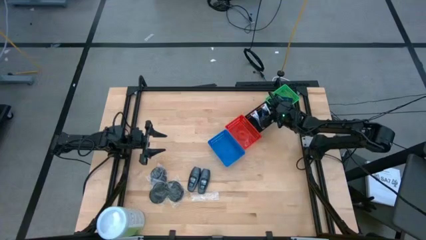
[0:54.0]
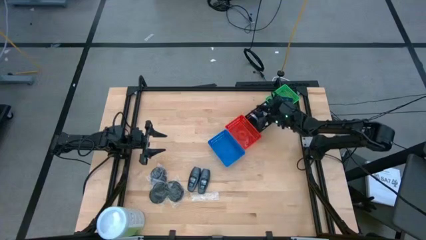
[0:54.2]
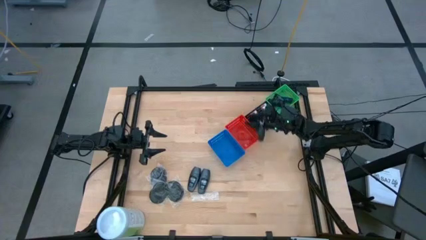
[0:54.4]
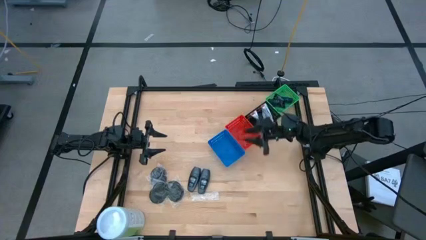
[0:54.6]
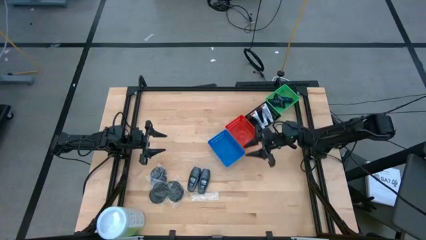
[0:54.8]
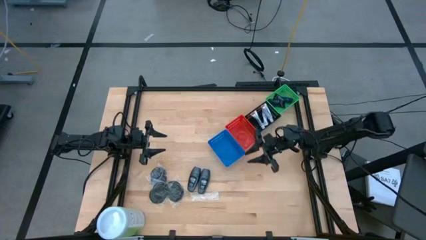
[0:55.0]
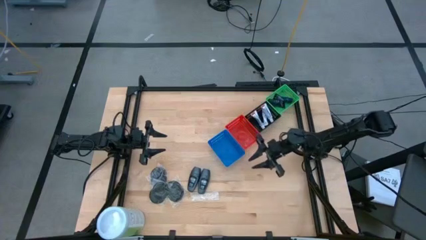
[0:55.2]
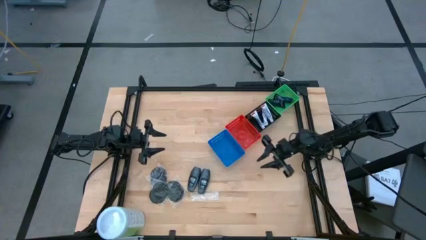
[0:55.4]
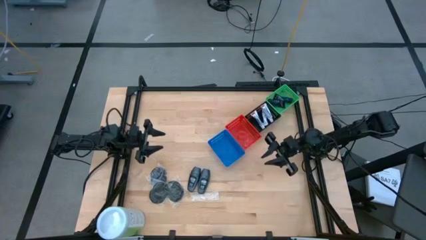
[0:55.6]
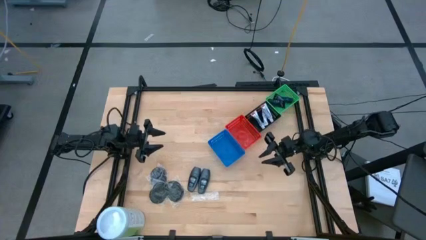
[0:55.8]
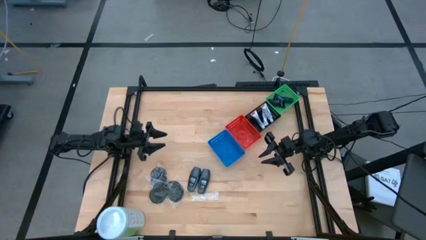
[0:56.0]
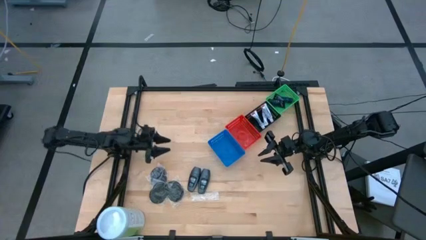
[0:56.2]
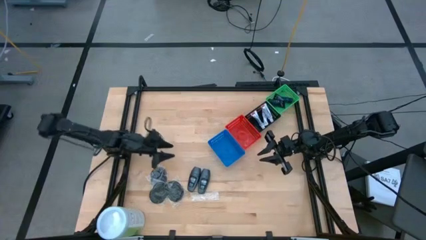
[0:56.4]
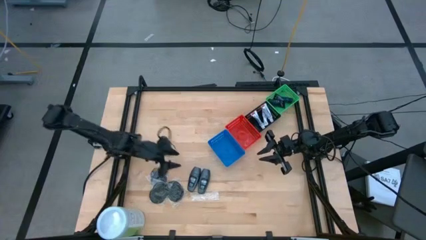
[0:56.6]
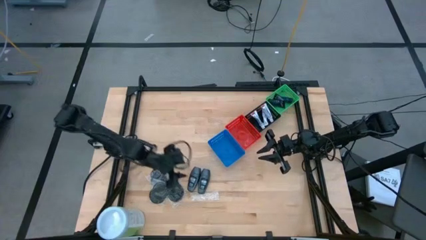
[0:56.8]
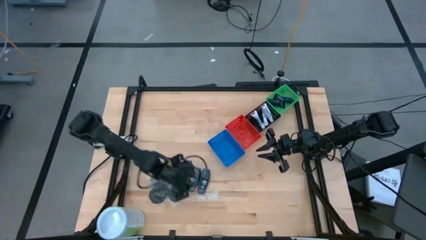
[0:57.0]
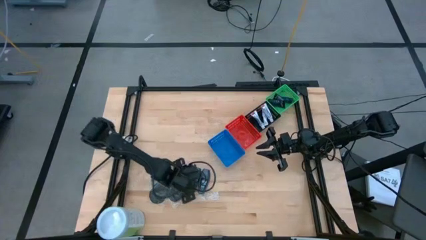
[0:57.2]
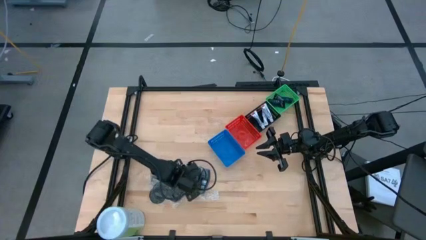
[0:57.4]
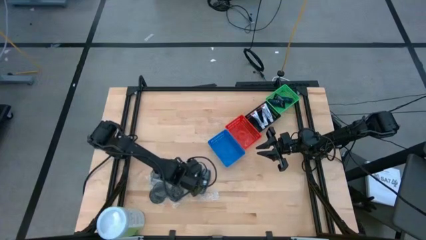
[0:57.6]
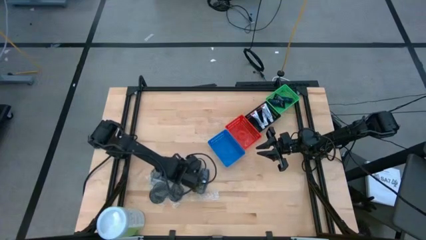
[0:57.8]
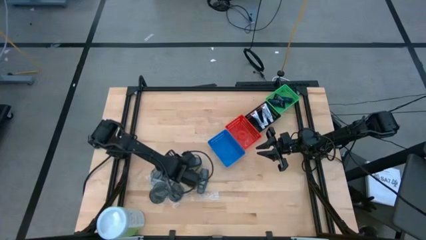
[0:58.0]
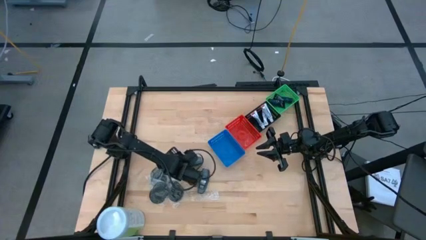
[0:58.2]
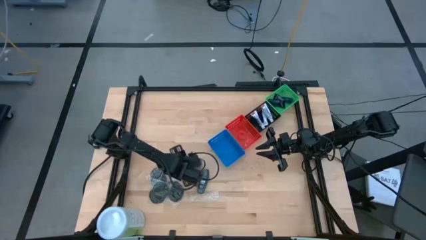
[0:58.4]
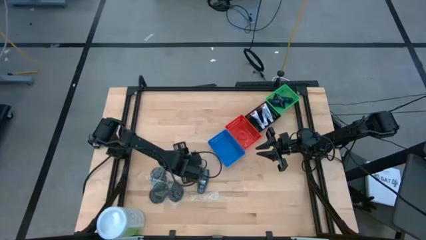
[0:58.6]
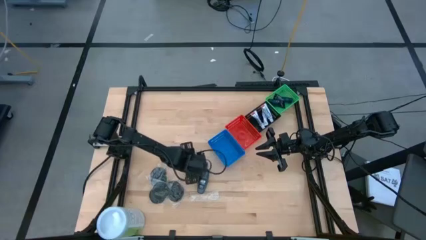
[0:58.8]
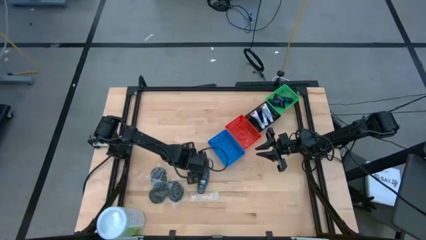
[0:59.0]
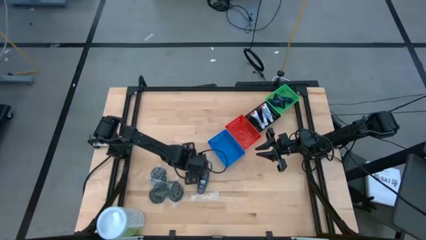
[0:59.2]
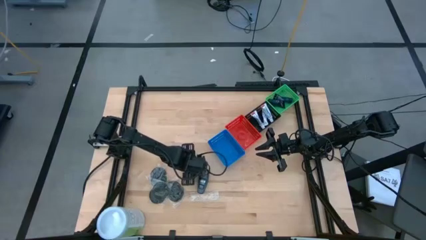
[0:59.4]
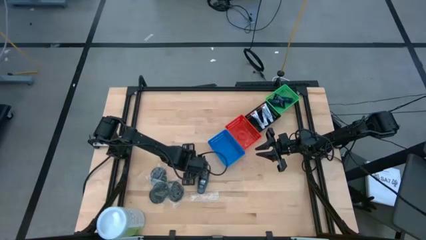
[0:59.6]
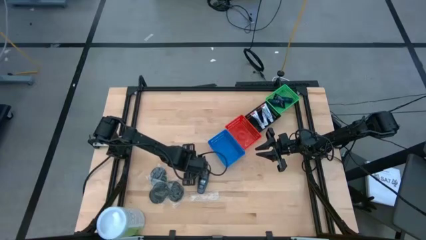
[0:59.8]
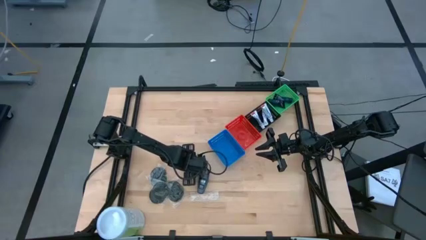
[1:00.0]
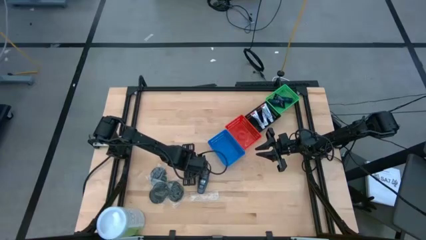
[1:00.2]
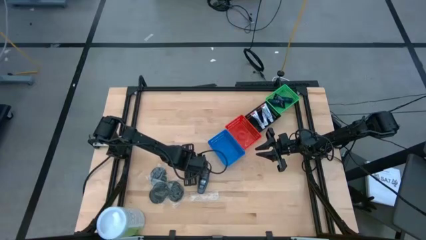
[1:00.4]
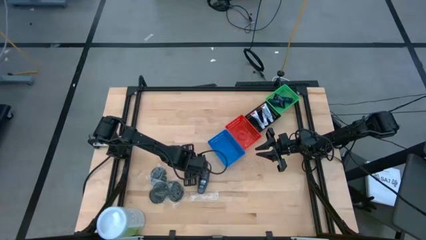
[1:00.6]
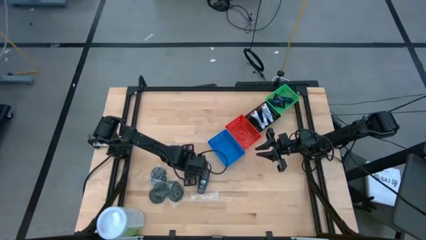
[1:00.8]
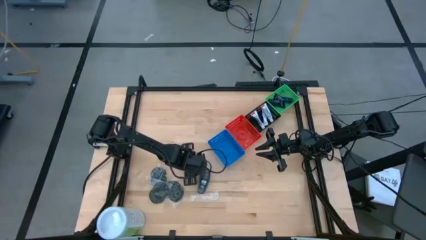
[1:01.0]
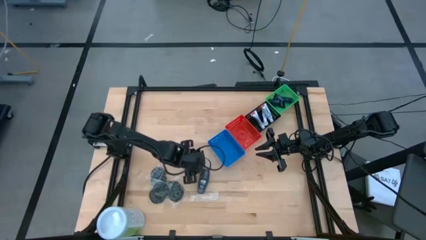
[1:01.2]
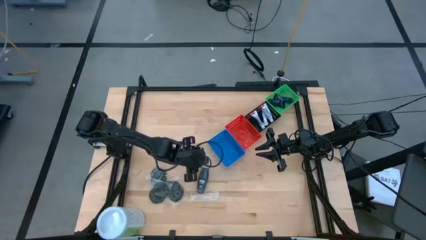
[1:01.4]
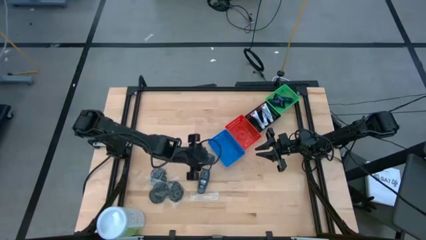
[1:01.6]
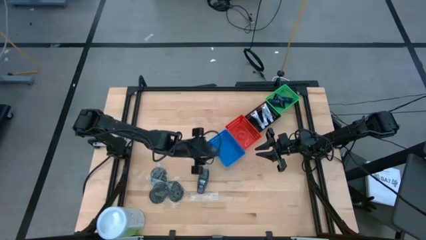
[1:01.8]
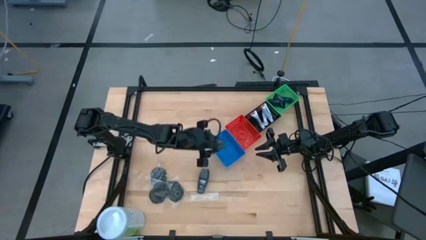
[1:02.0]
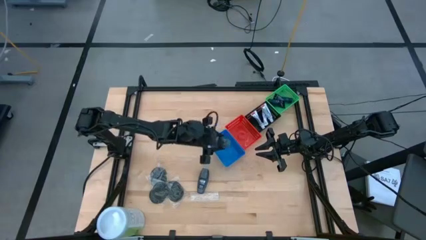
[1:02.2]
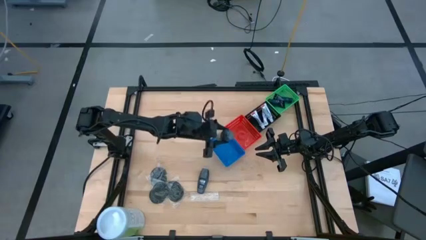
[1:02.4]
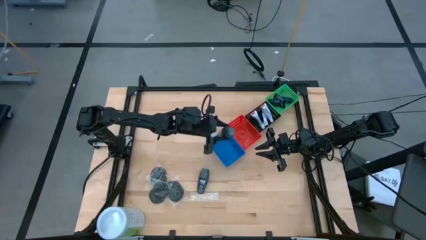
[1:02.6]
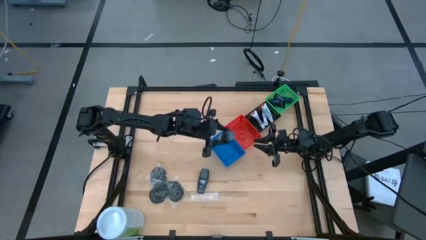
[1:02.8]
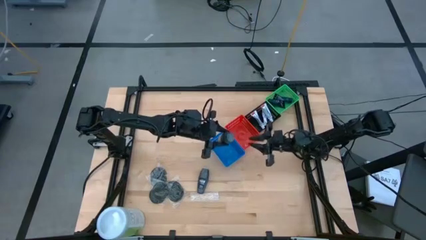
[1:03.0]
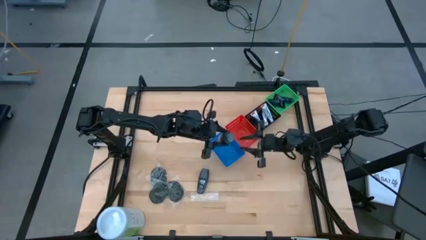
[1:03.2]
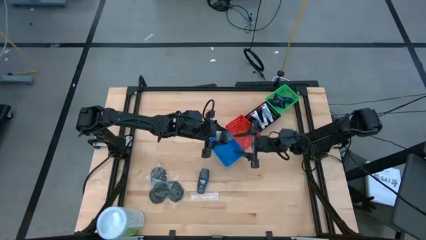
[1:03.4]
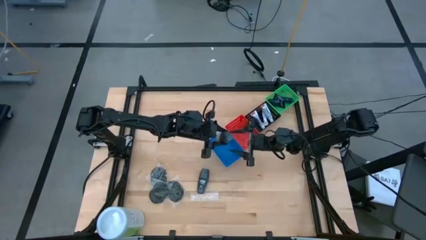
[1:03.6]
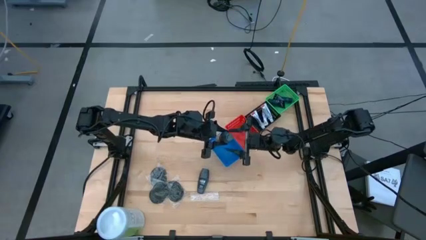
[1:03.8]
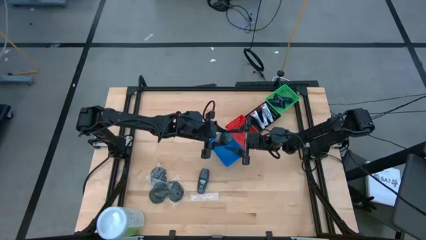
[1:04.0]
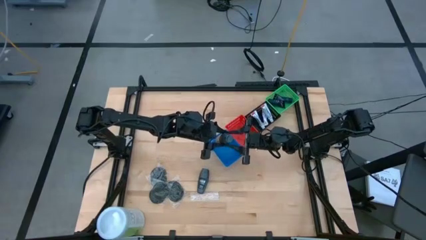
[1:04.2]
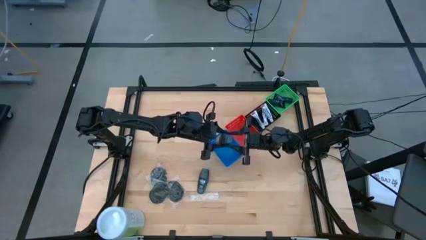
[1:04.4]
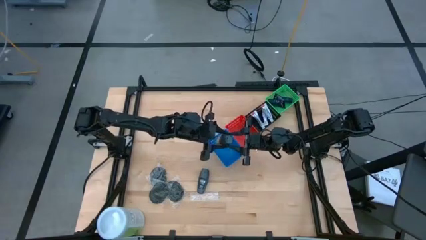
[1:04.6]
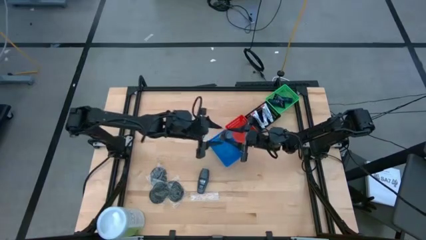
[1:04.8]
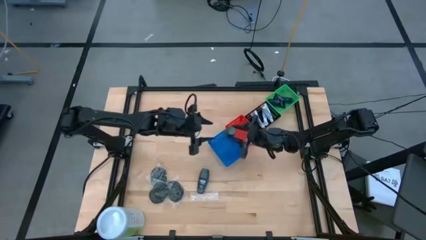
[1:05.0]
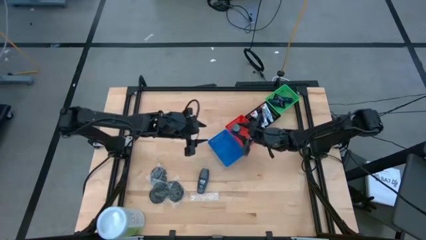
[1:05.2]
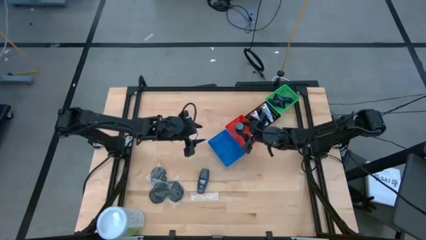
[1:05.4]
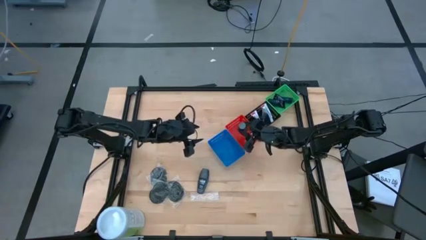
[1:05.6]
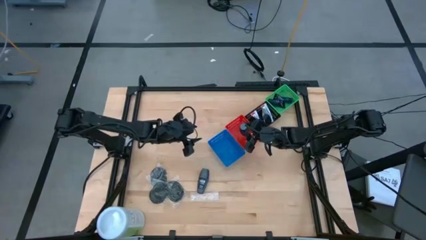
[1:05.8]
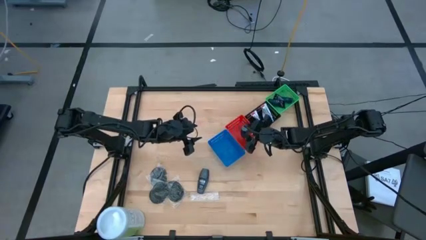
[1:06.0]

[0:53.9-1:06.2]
Task: Pick & Place Travel size toiletries
Put the left deodorant into the red bin

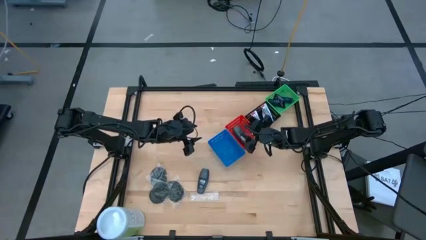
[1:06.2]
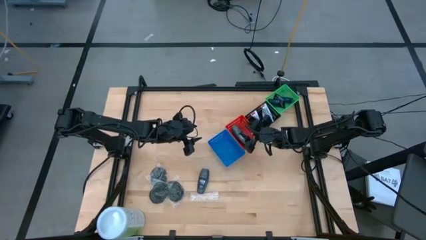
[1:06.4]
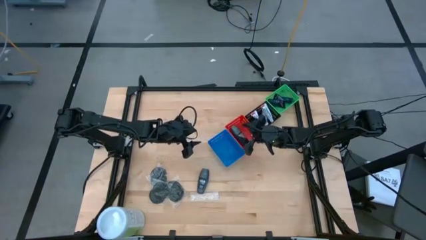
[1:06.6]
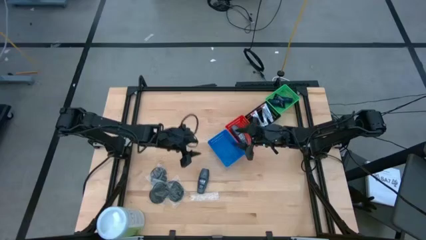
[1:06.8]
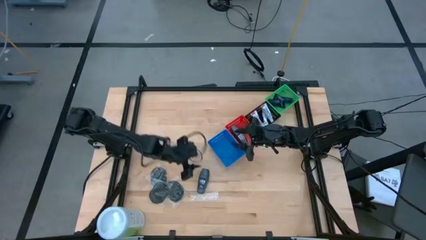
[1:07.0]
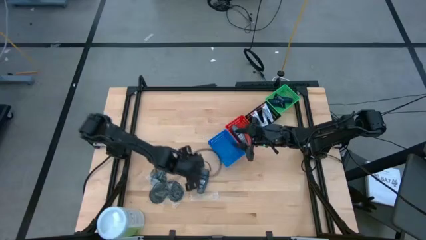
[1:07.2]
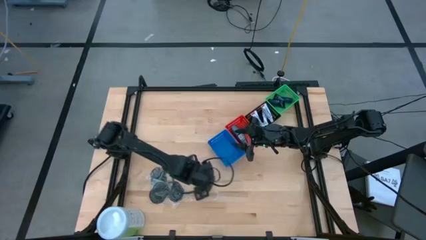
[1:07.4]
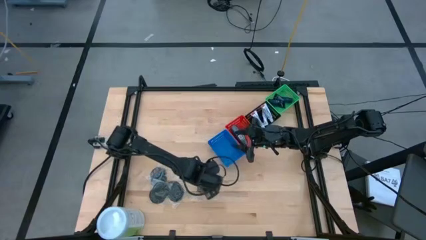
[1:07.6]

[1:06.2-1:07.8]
Put the deodorant into the red bin

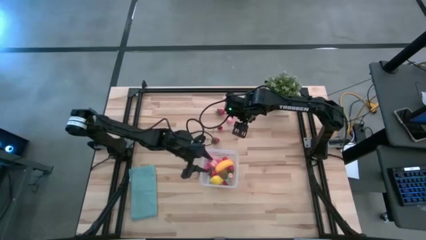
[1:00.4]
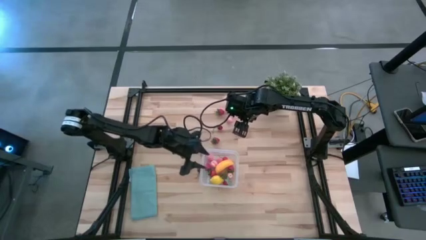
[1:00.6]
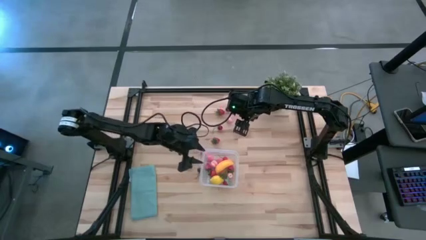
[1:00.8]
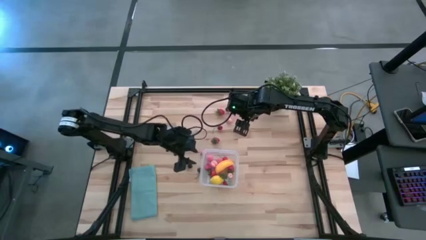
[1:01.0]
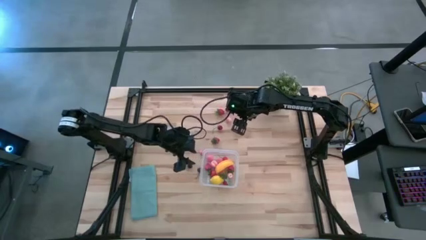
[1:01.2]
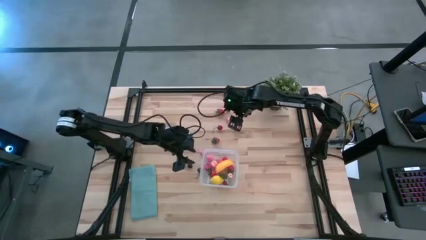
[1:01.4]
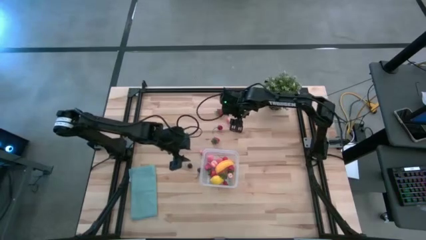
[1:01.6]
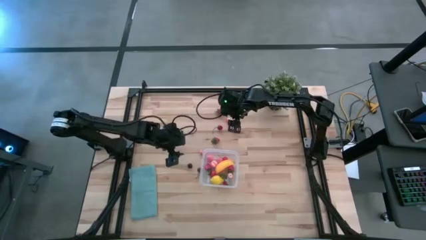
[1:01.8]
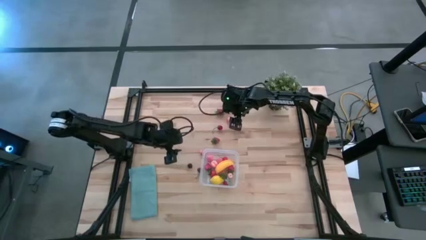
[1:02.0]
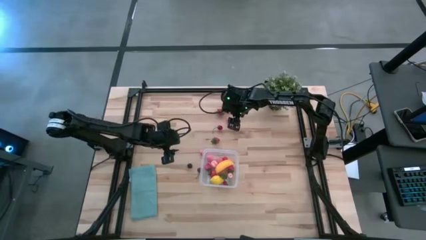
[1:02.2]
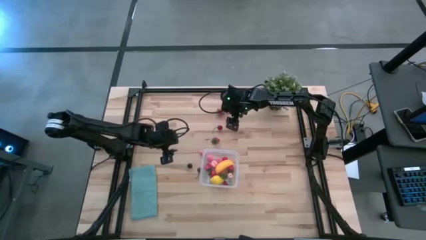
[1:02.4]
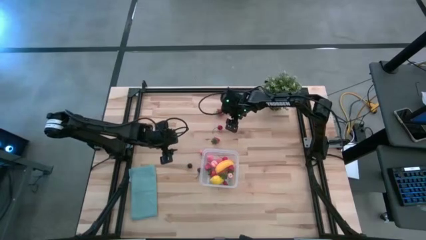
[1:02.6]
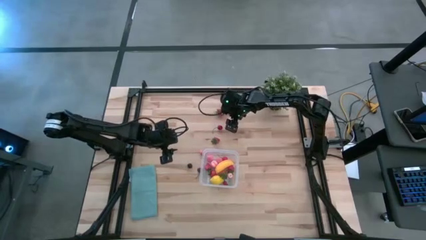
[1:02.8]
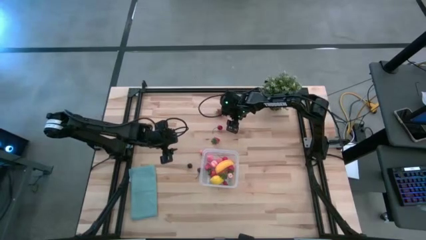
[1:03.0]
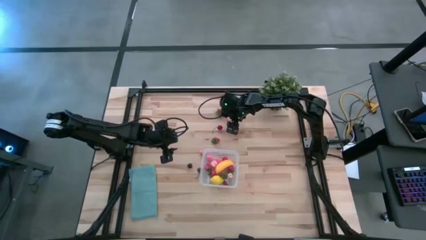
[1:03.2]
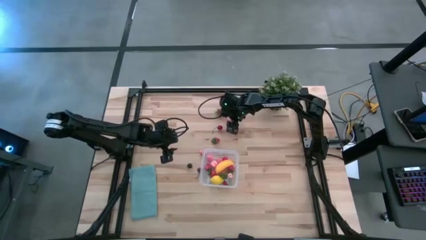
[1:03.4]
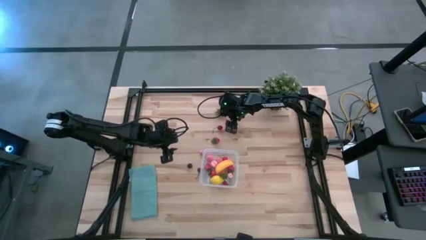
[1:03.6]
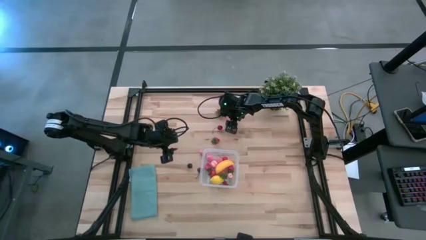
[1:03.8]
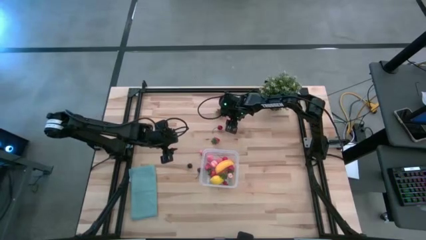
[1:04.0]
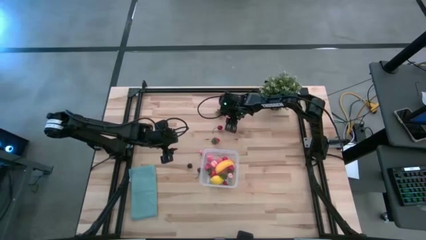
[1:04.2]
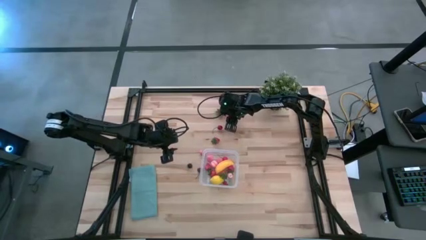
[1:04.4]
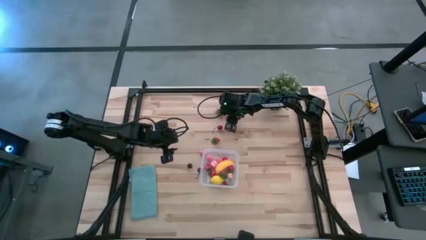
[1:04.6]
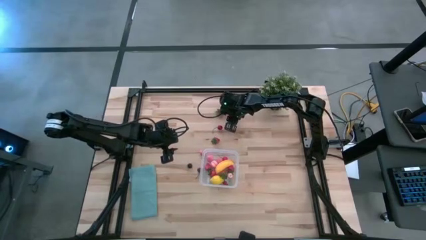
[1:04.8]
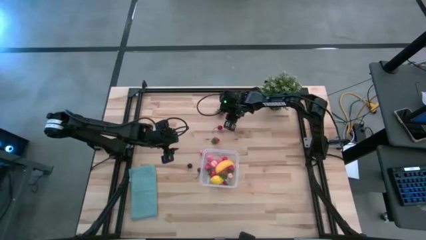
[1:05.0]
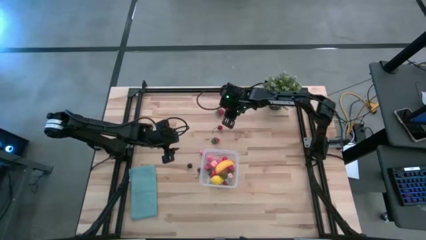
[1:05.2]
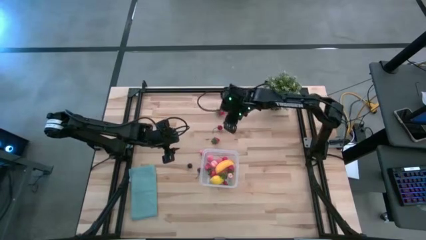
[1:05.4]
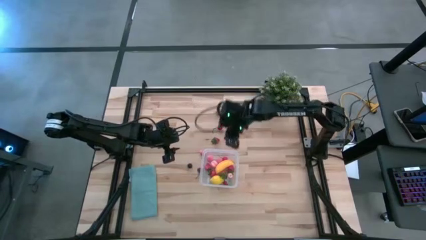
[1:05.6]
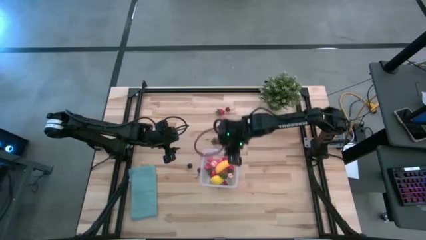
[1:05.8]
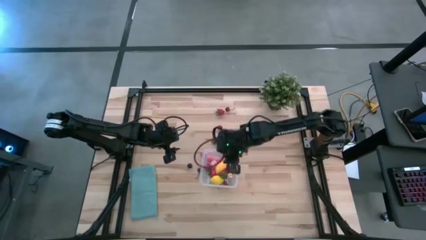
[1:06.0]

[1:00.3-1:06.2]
Task: Pick and placing Produce into tupperware
Put the pink peach into the transparent container
